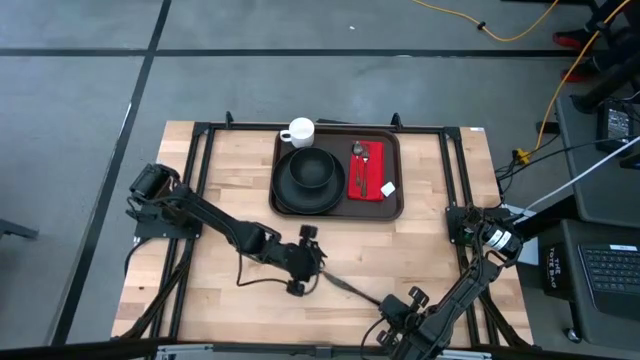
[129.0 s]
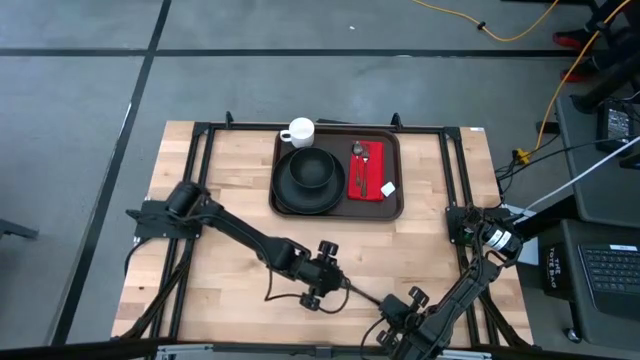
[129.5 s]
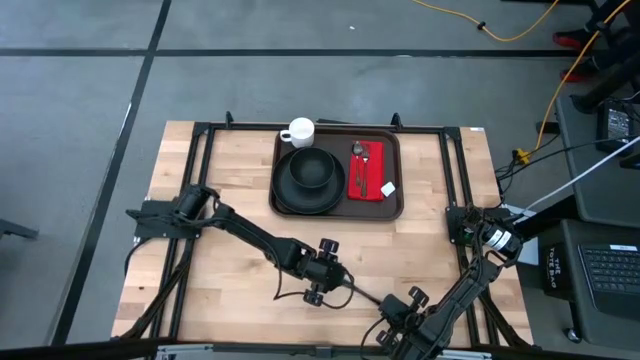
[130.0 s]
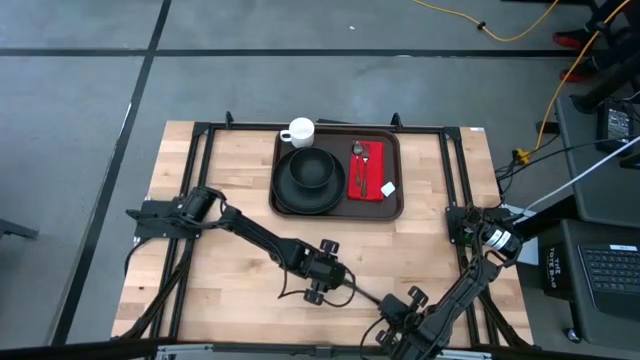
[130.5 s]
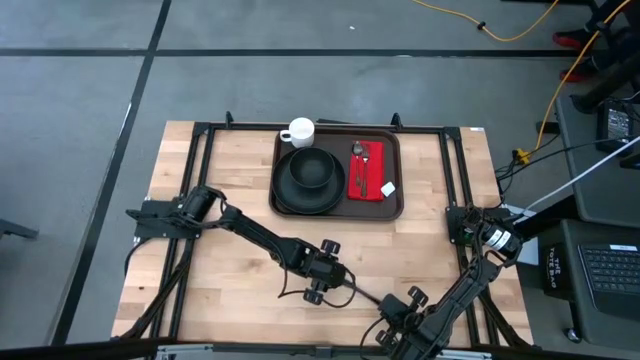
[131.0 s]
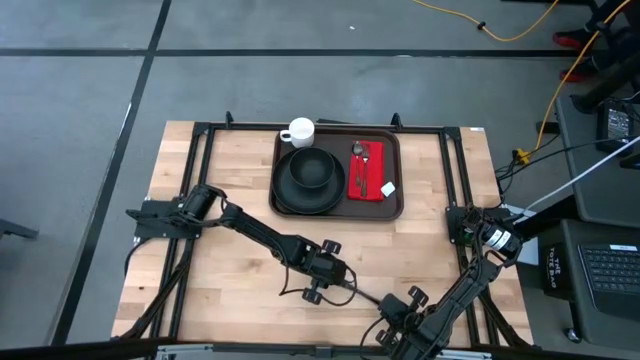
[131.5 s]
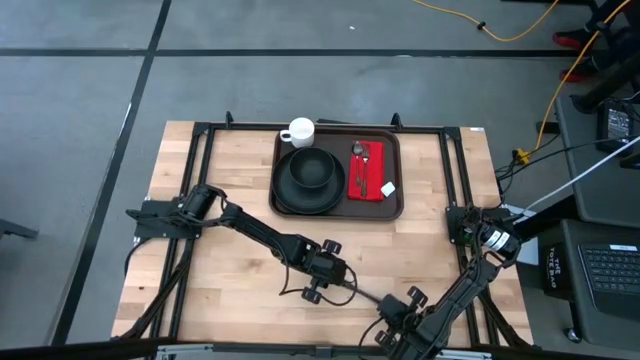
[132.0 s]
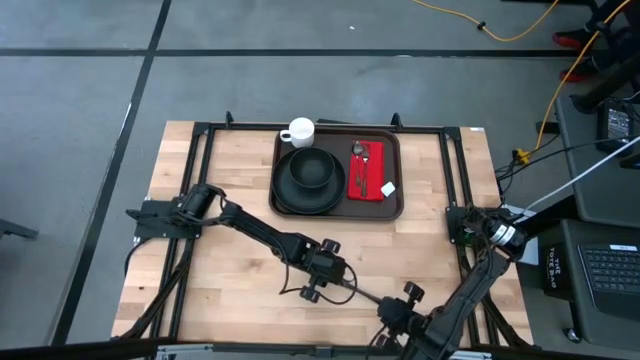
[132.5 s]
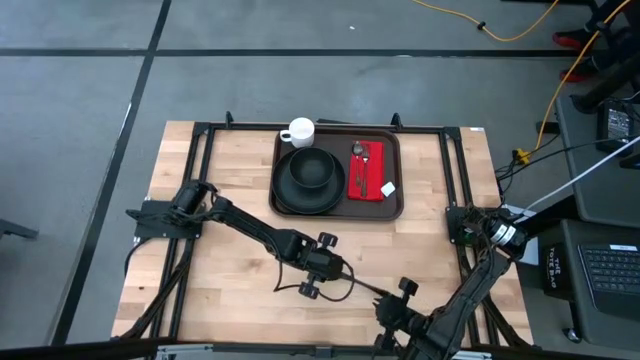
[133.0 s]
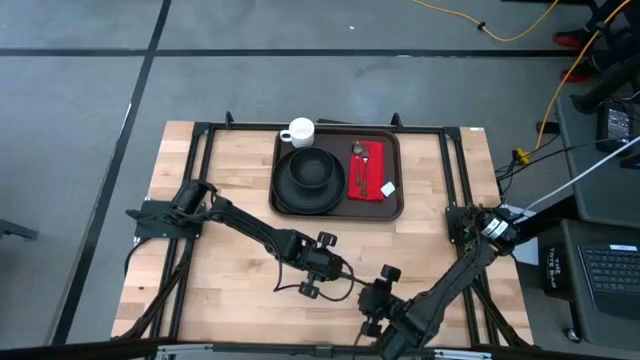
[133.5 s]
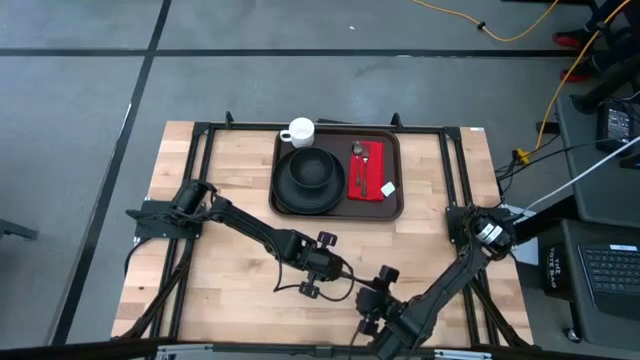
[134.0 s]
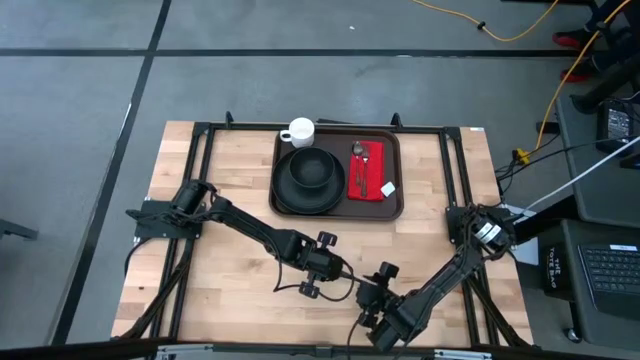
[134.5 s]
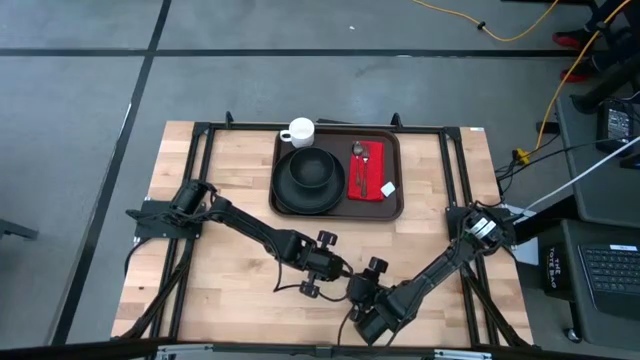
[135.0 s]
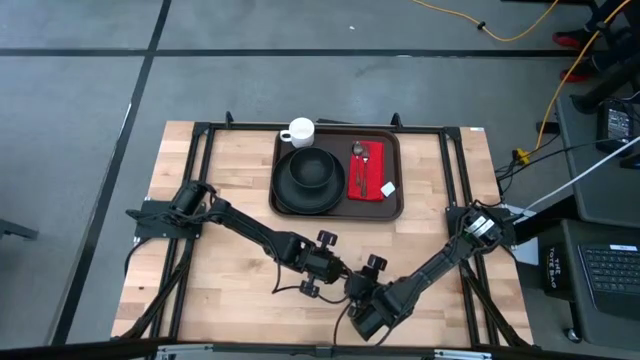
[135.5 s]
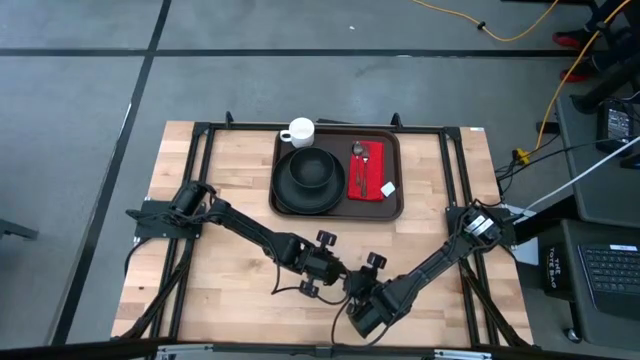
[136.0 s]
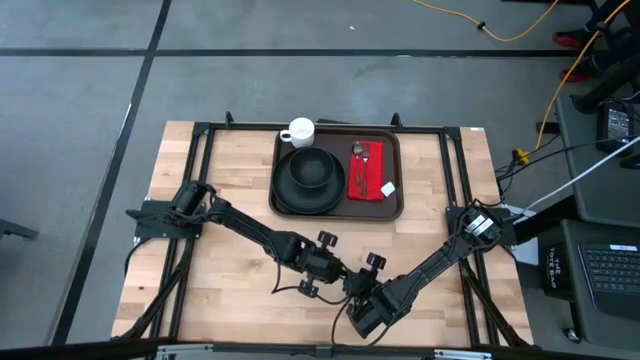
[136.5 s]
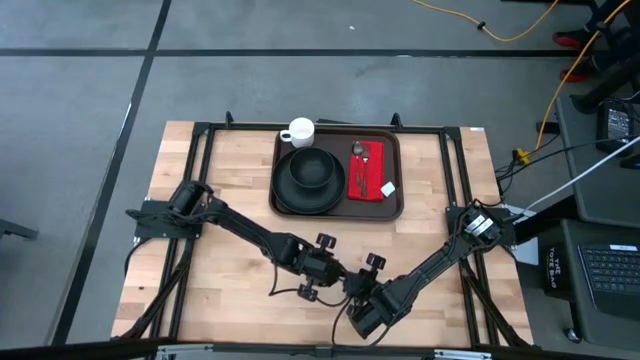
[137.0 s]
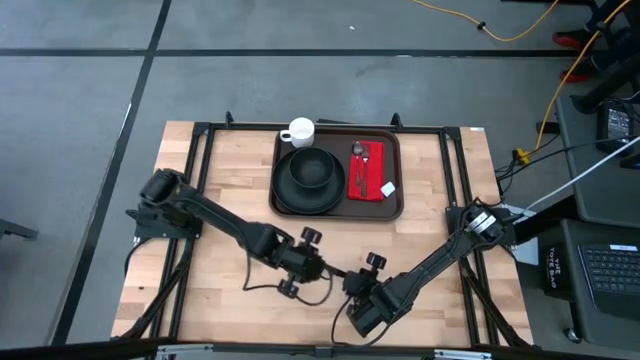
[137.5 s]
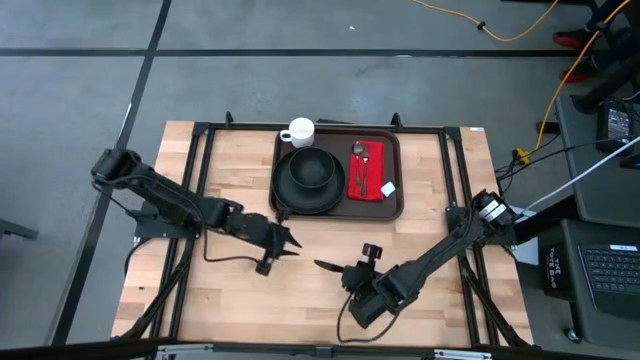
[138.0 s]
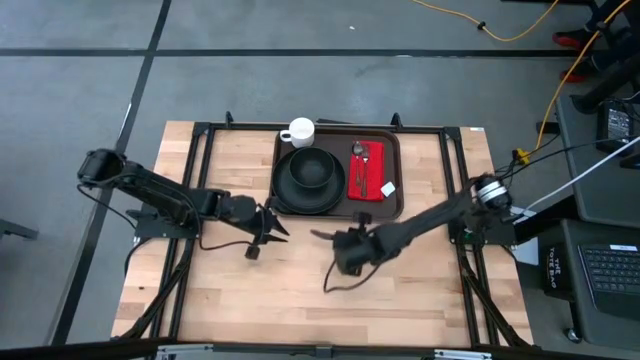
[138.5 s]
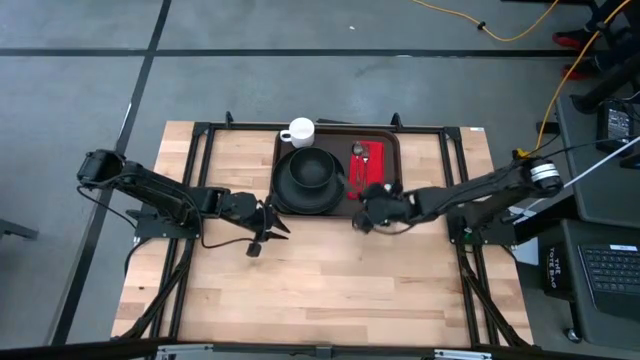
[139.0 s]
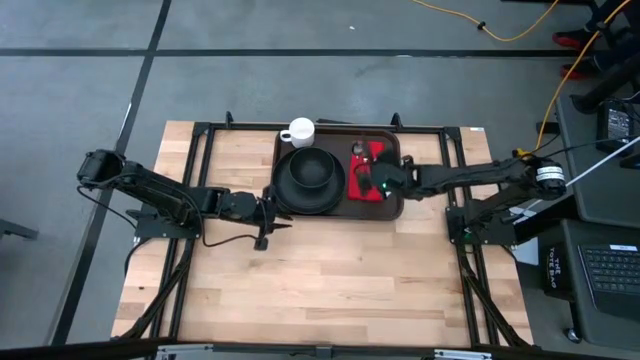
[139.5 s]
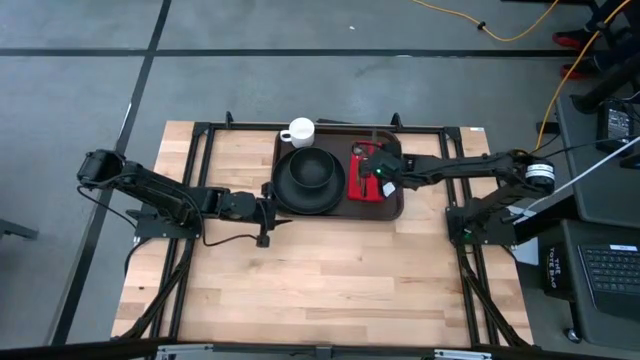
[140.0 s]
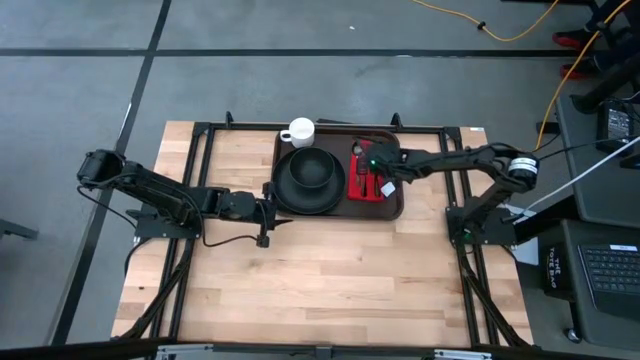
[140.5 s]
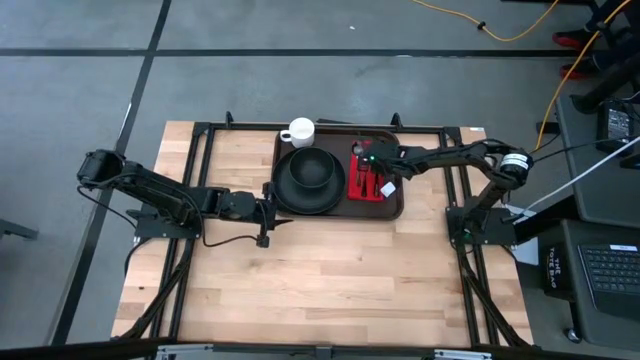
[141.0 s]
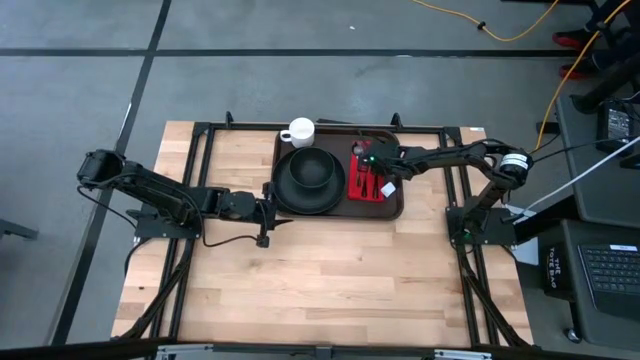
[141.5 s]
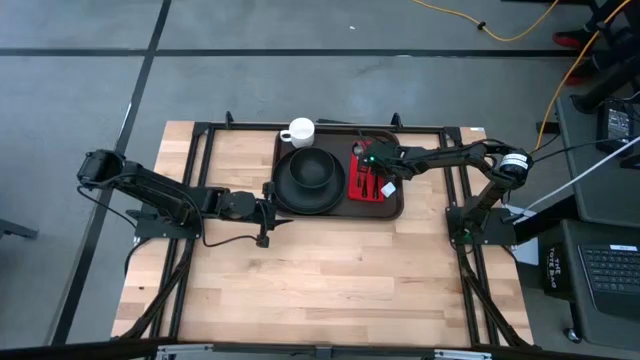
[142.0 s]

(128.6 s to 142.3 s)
Task: Set up tray
Put the black knife to the right of the black fork on the red napkin on the brown serving tray

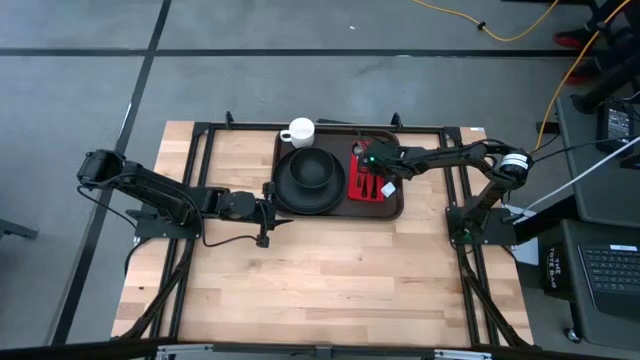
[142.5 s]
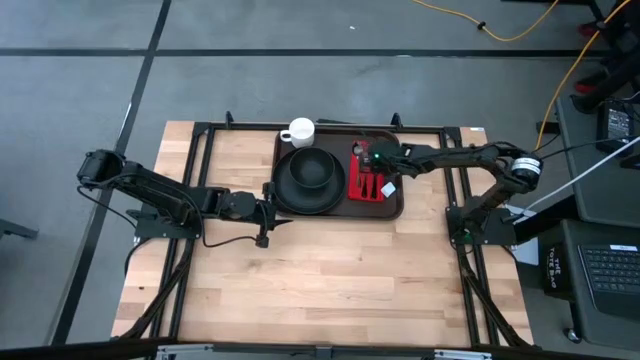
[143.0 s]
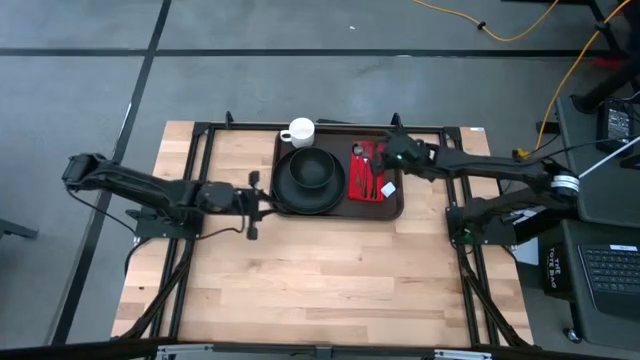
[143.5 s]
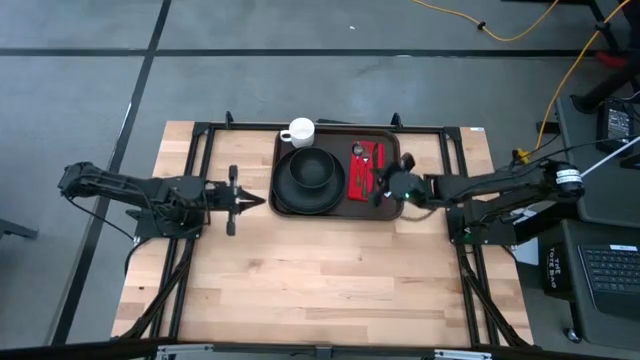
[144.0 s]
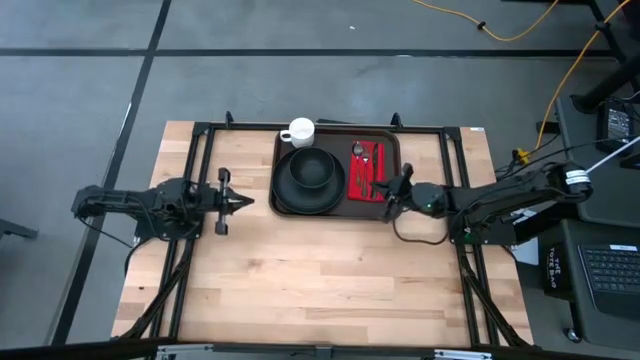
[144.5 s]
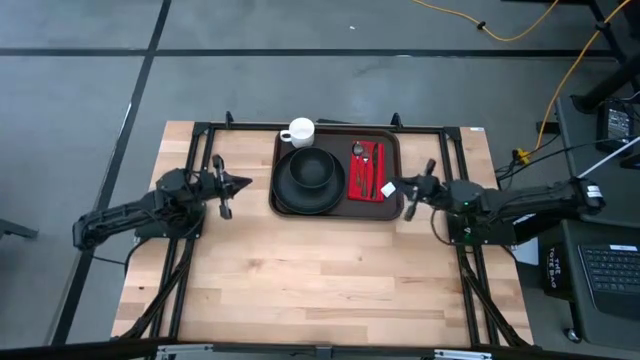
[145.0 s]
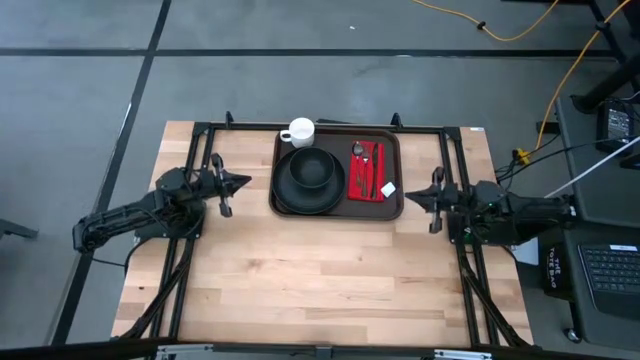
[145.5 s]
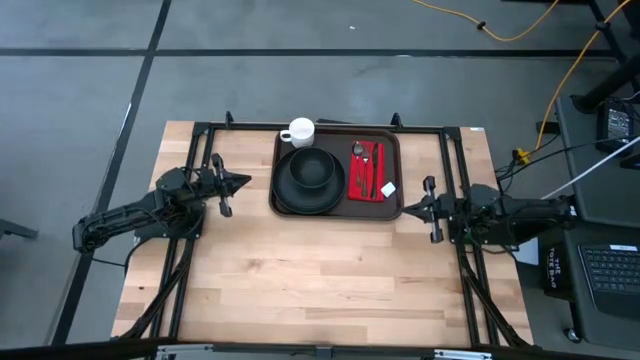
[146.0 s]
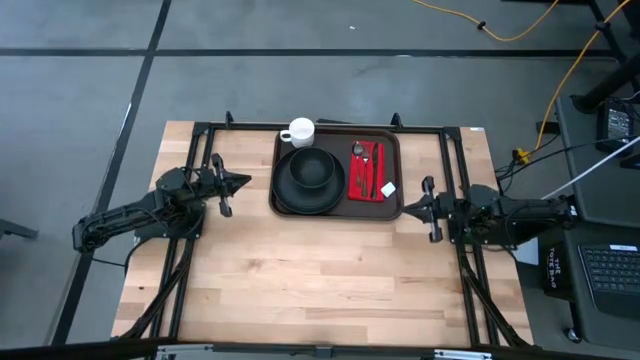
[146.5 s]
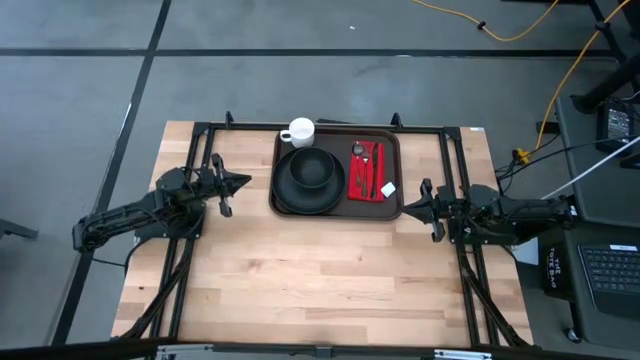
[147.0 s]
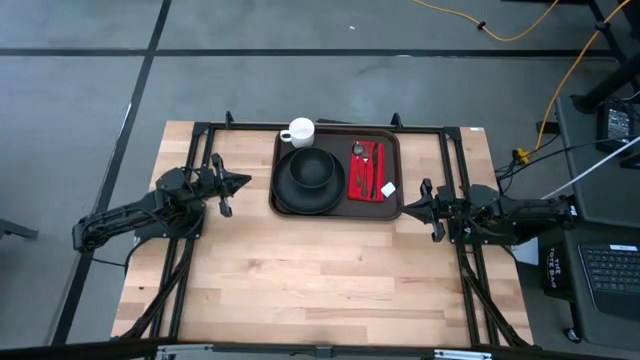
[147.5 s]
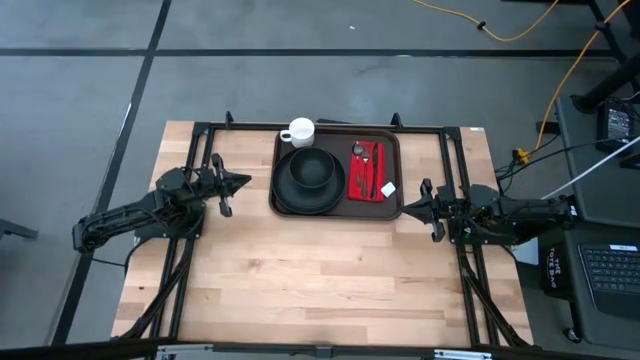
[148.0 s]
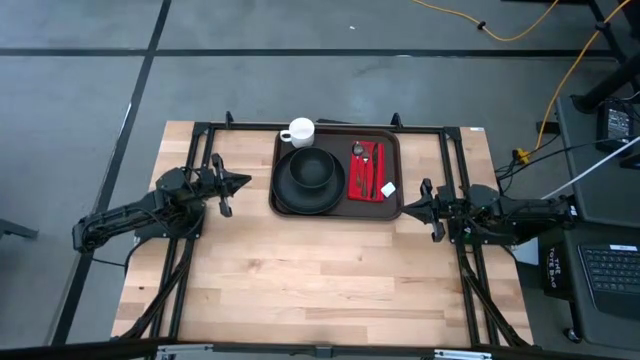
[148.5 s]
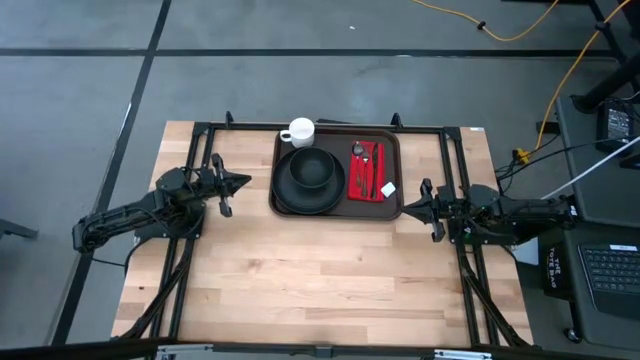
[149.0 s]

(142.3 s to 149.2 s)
Return to Home Position
